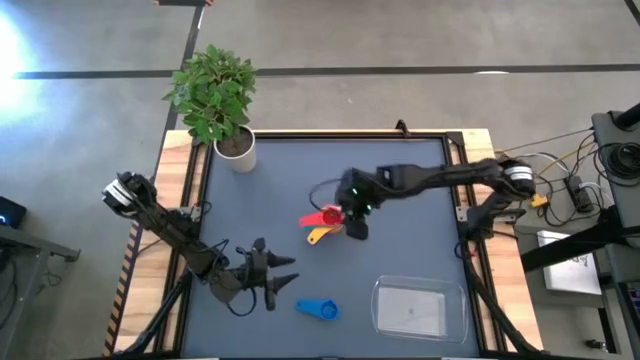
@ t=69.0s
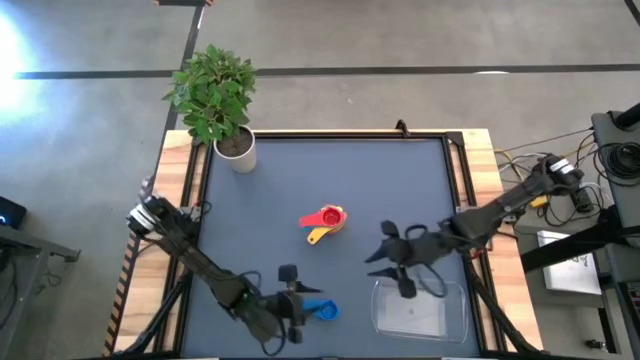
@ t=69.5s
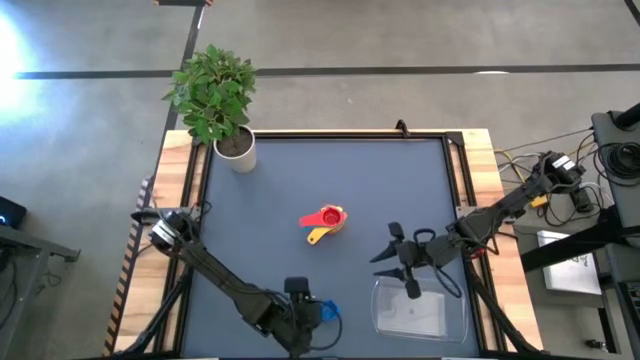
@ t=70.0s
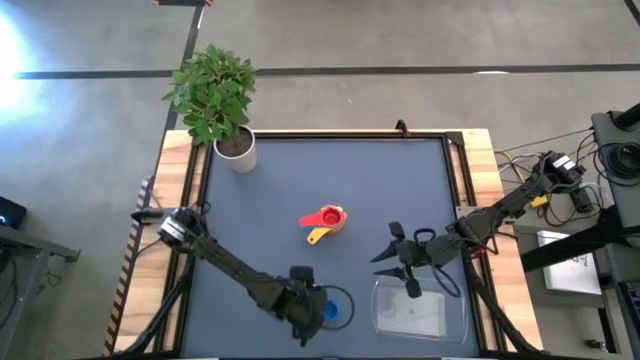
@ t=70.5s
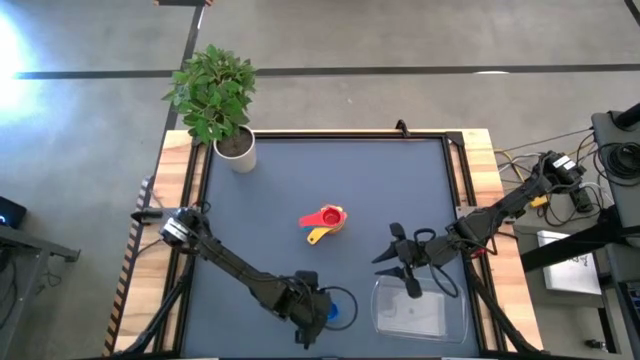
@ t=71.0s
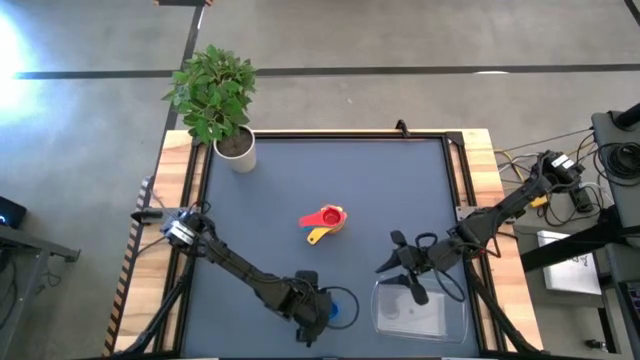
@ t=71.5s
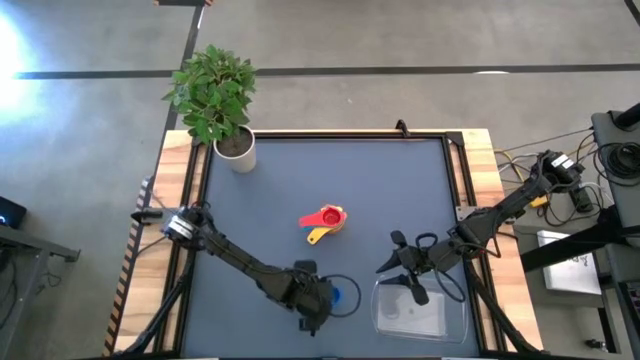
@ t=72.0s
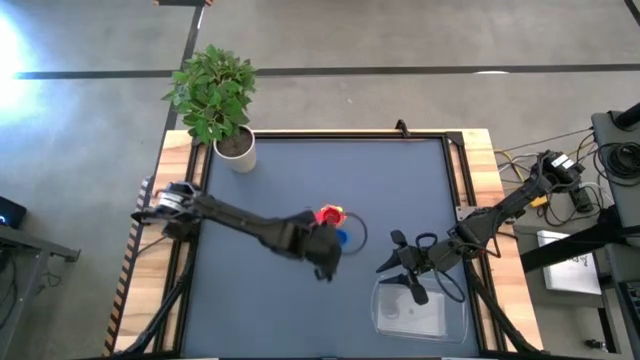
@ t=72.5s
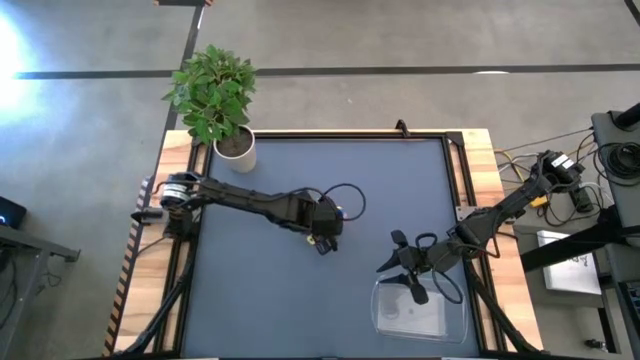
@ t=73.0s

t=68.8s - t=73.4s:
Task: Nest measuring cups in basket
Stack the blue measuring cup on top of the red measuring cup

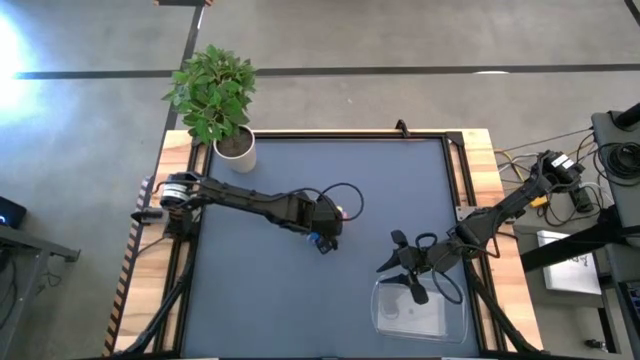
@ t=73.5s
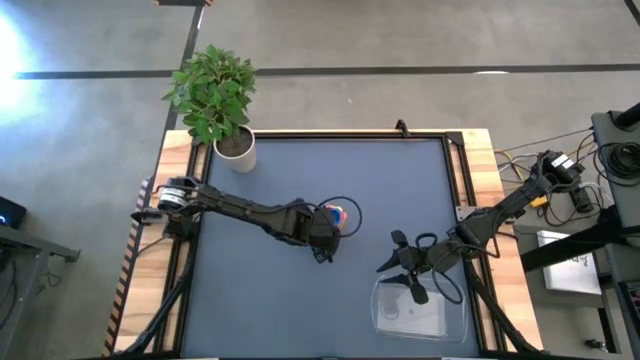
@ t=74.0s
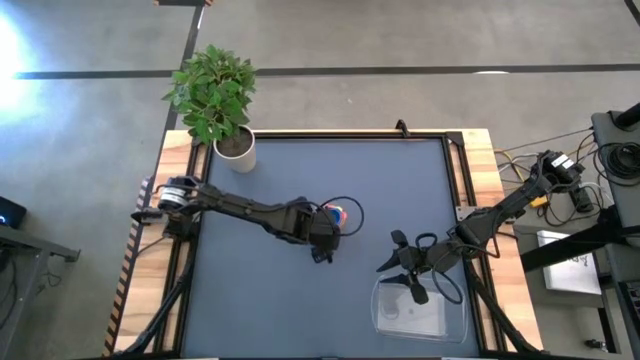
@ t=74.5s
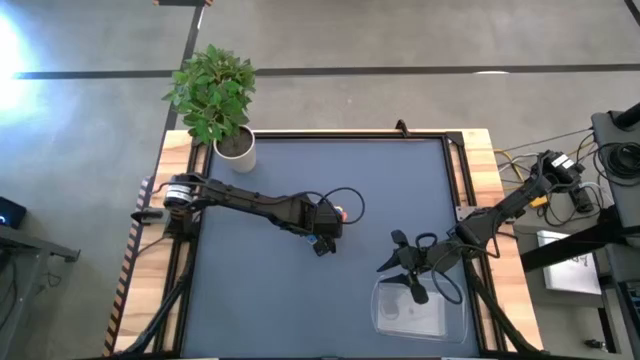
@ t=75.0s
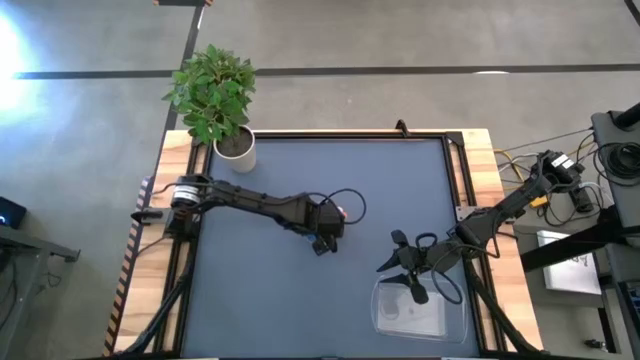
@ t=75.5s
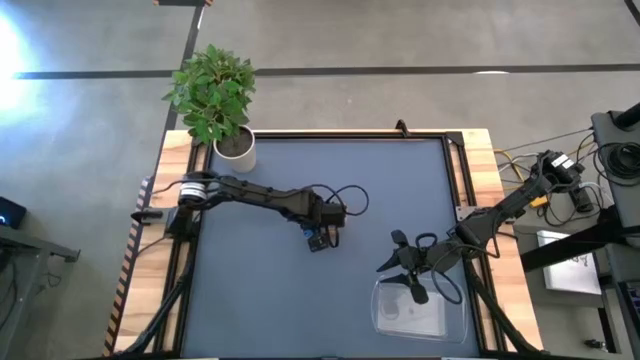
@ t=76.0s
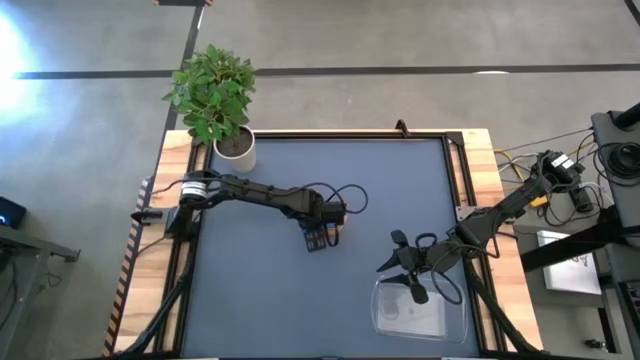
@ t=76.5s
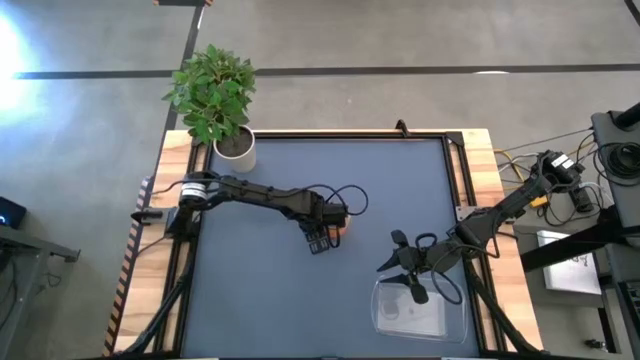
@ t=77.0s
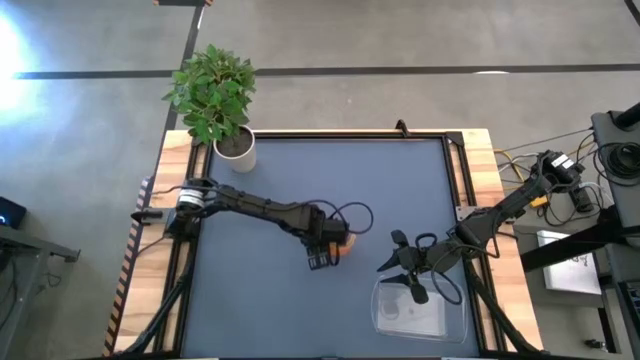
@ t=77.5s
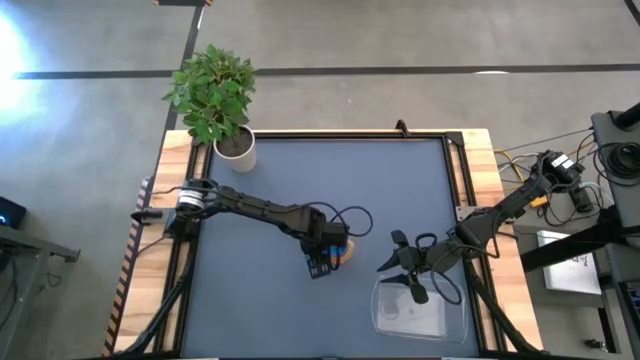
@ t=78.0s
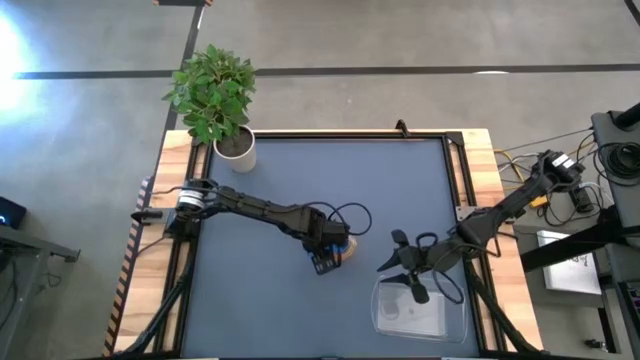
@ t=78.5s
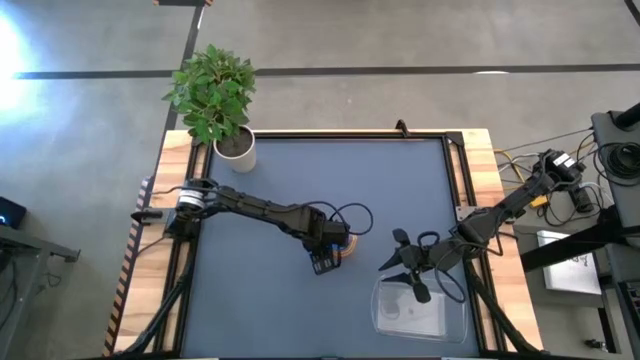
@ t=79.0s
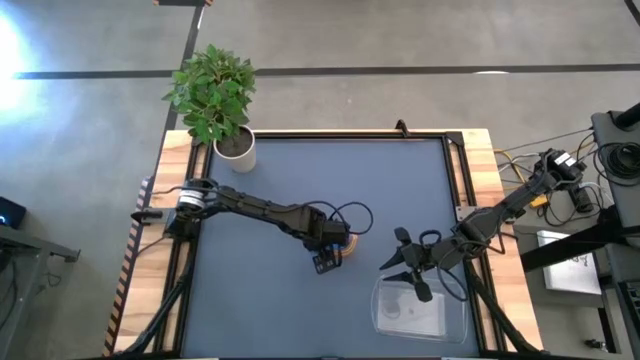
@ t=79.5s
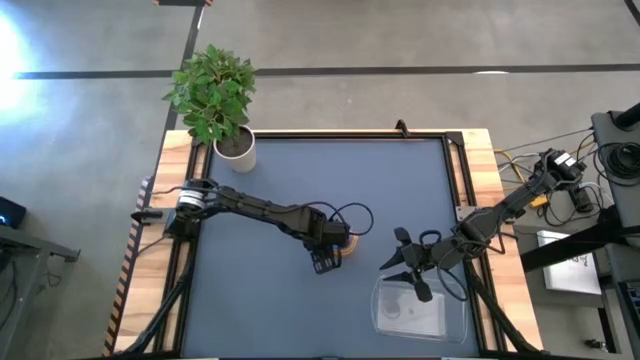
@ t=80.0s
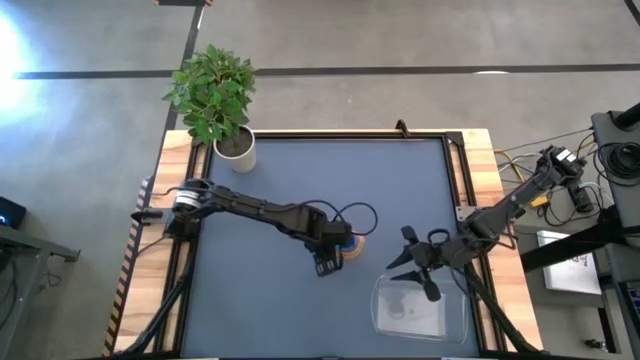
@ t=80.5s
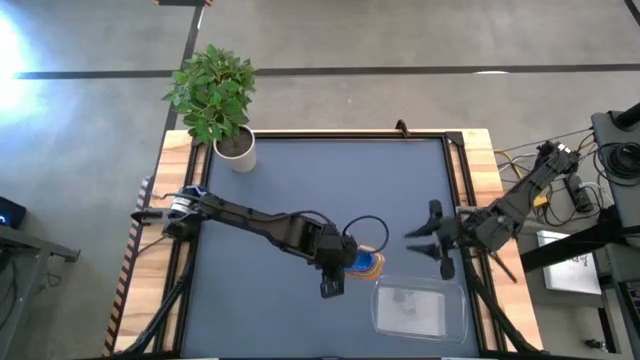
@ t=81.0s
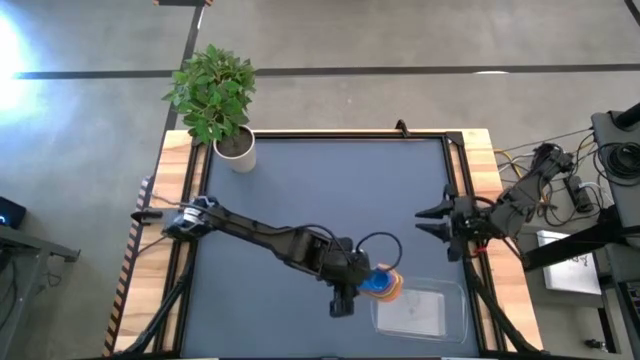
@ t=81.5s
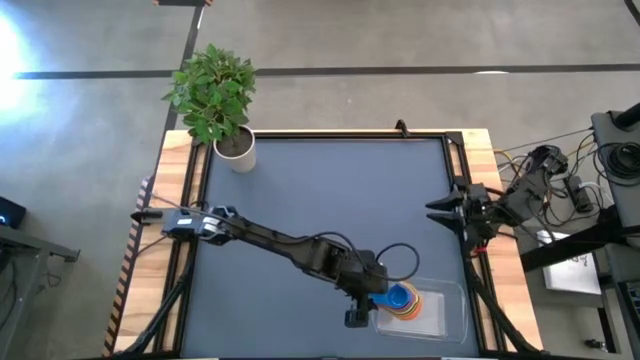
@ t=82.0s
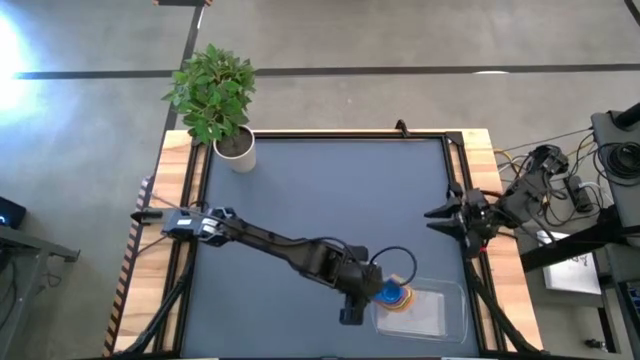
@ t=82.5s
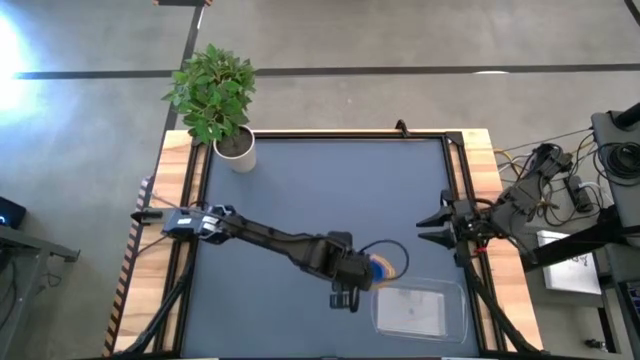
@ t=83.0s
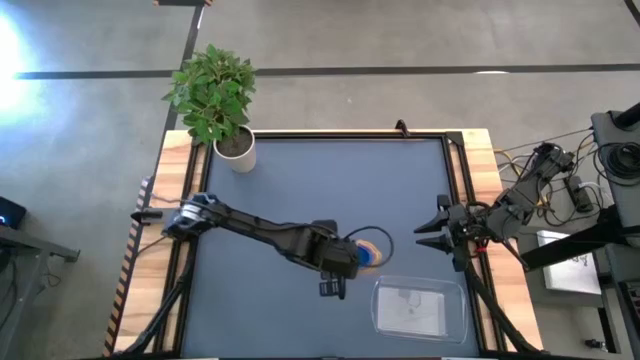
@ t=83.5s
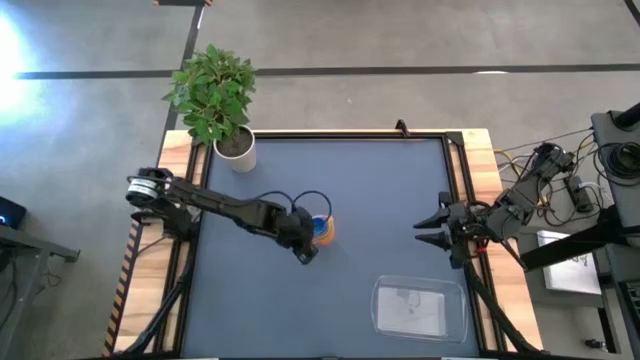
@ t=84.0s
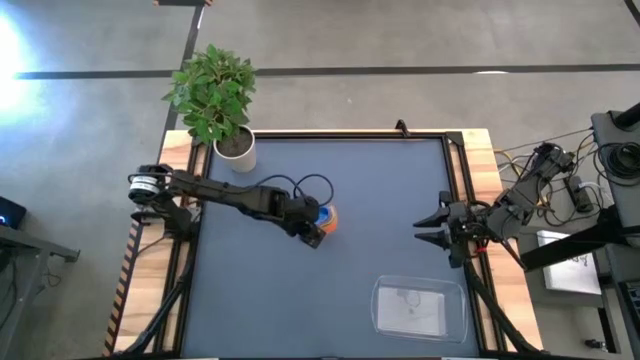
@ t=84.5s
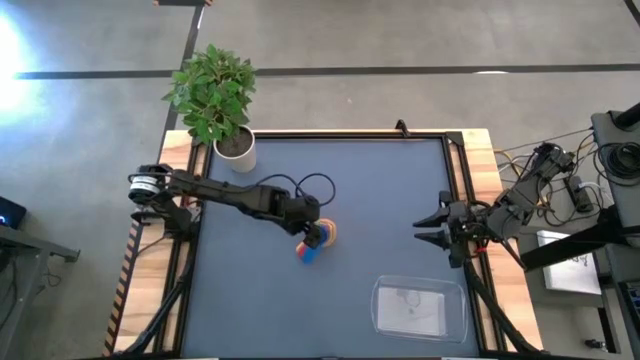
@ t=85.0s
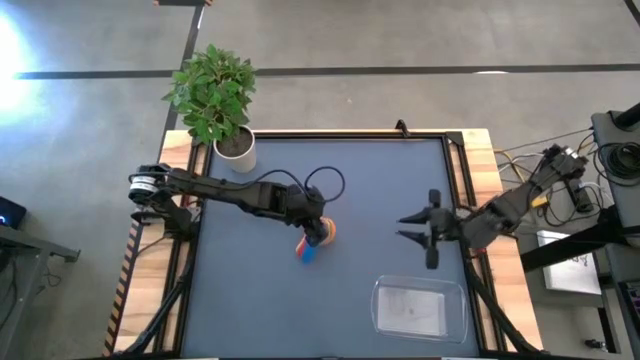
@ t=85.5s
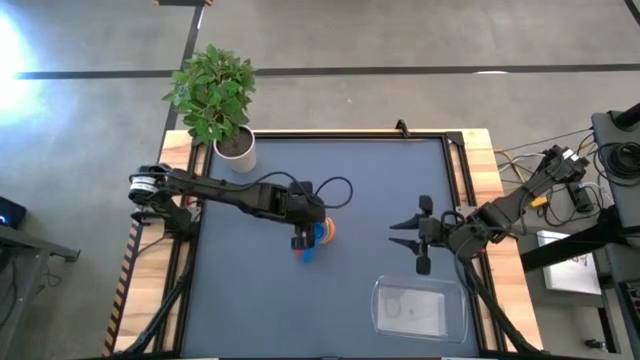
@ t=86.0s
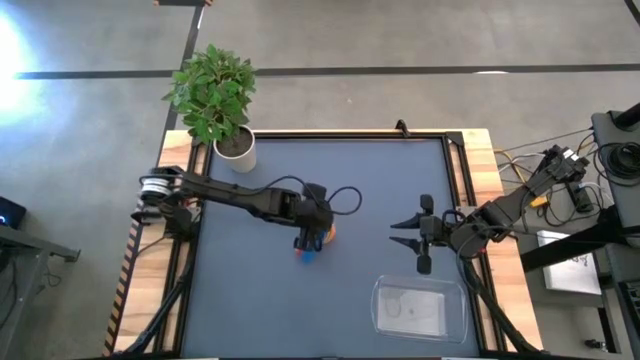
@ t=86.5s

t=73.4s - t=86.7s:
Put the stack of measuring cups into the bin

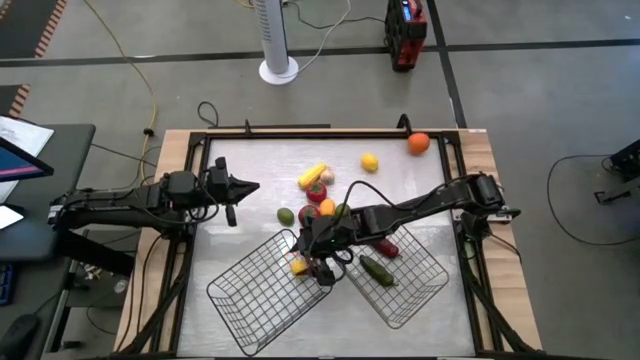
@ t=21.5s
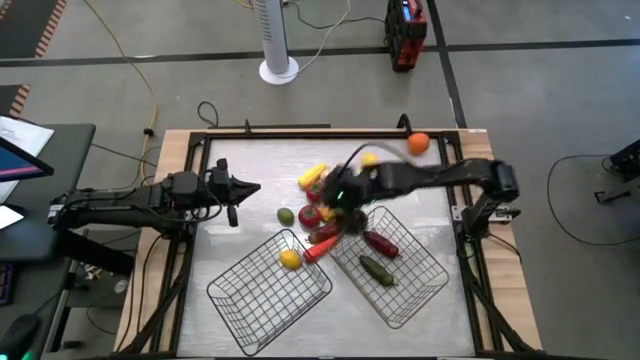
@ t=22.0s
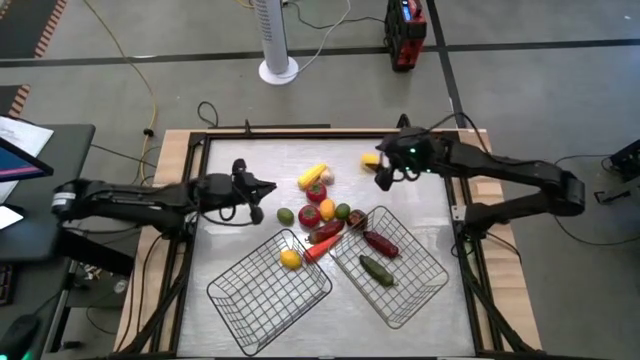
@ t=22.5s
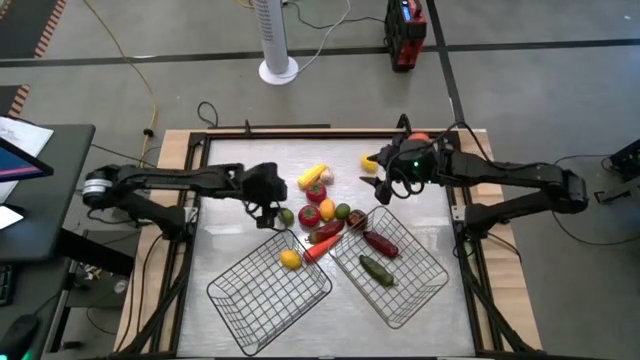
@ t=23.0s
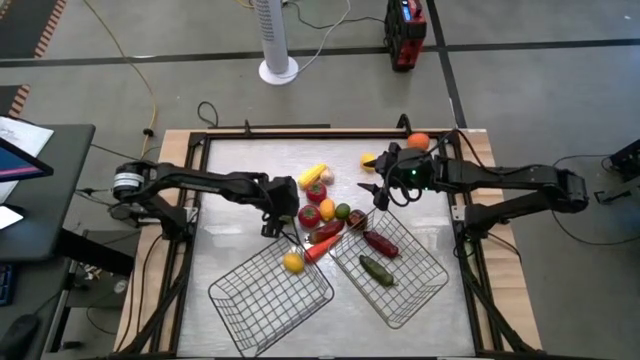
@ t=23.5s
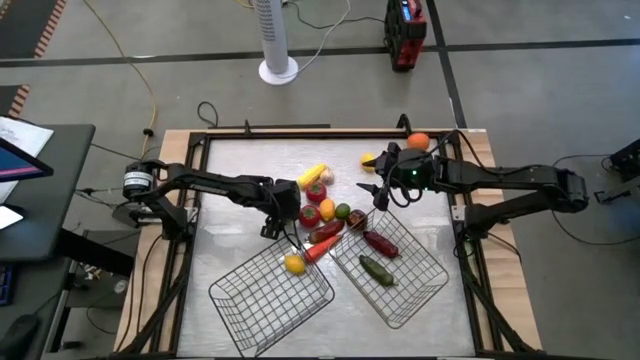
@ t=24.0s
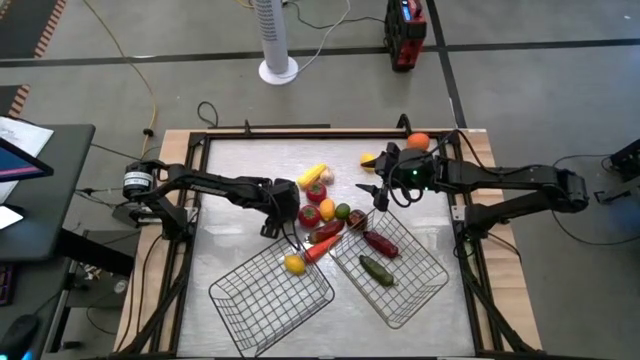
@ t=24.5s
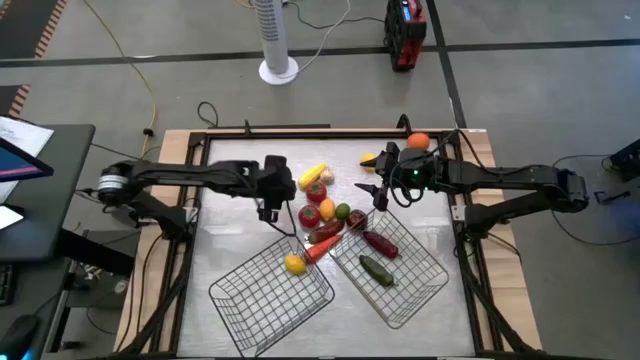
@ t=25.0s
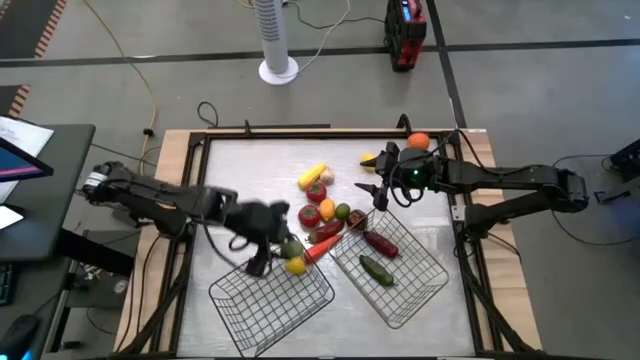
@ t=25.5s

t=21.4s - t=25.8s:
Task: Sort produce into baskets
Put the left green lime into the black wire basket
